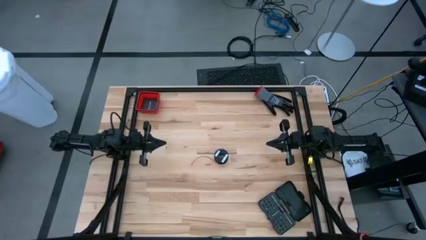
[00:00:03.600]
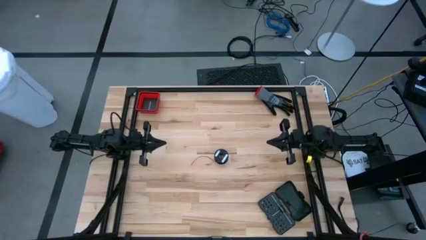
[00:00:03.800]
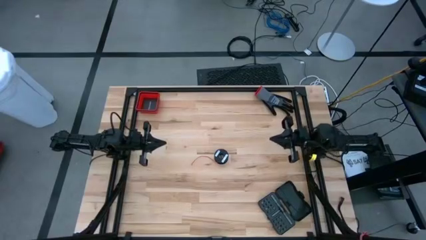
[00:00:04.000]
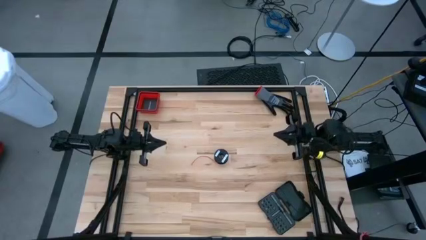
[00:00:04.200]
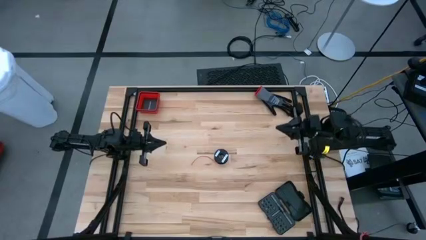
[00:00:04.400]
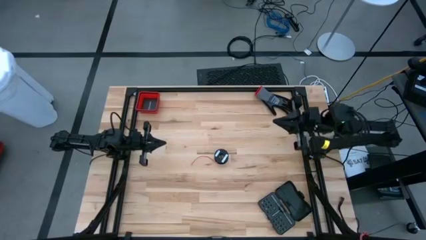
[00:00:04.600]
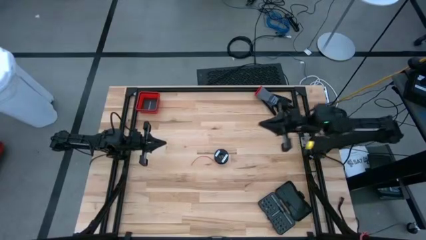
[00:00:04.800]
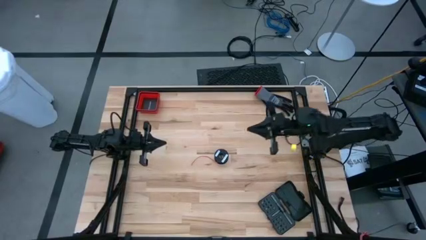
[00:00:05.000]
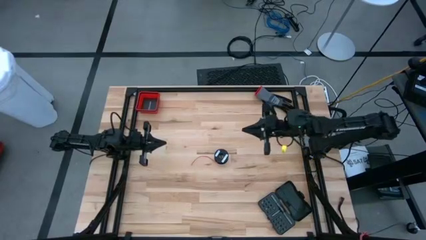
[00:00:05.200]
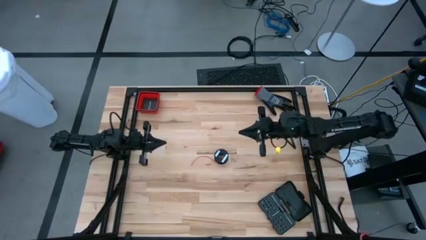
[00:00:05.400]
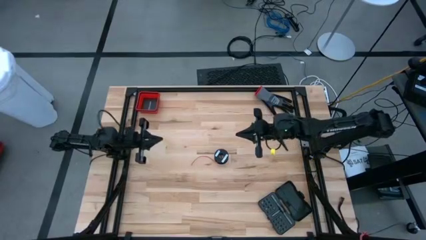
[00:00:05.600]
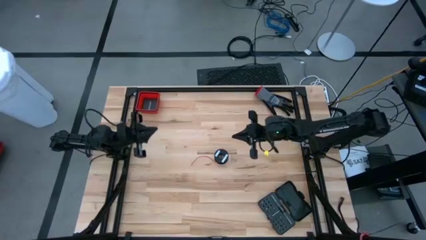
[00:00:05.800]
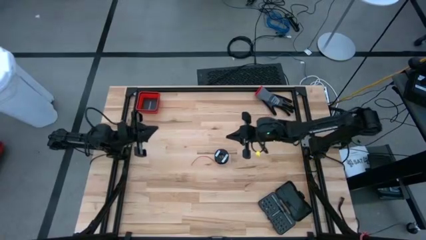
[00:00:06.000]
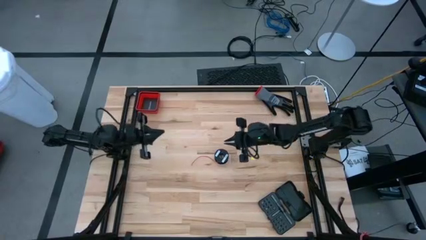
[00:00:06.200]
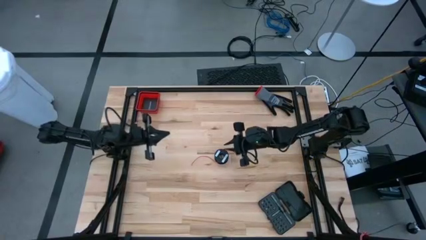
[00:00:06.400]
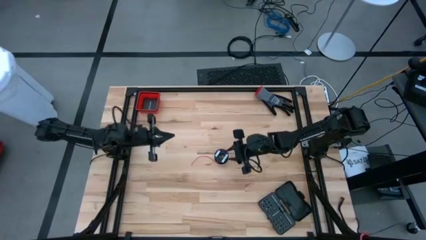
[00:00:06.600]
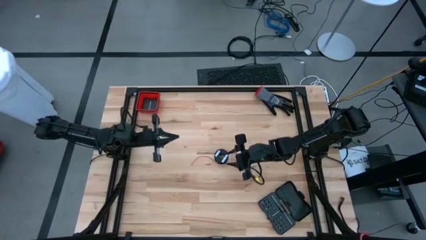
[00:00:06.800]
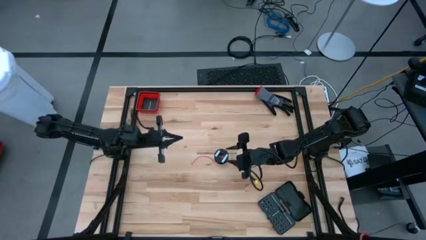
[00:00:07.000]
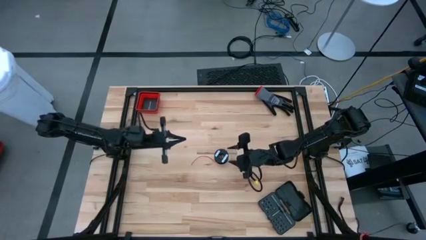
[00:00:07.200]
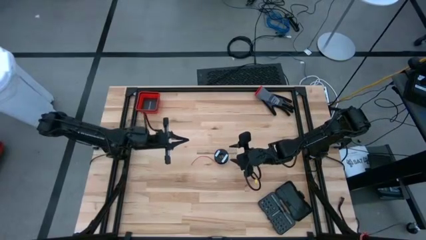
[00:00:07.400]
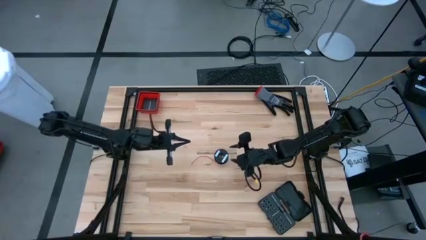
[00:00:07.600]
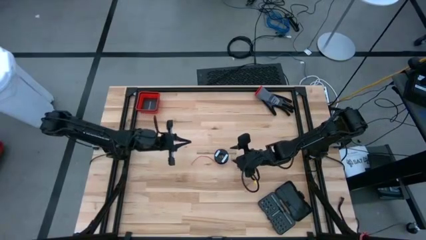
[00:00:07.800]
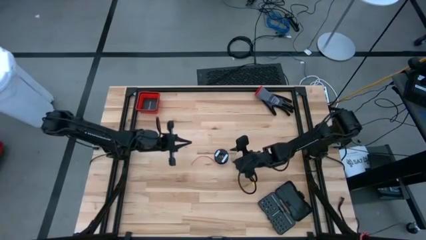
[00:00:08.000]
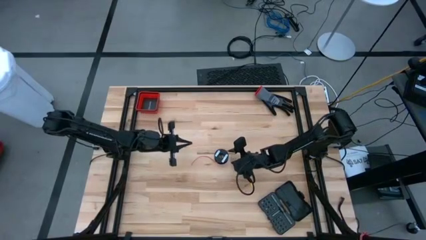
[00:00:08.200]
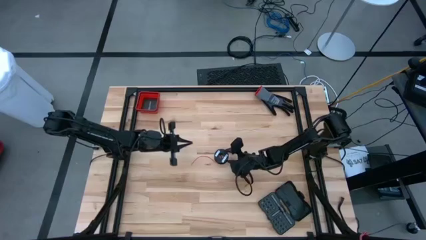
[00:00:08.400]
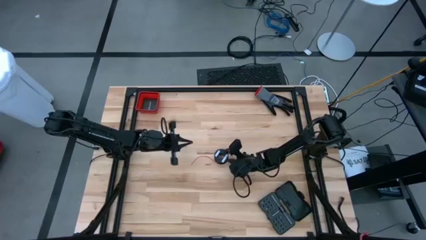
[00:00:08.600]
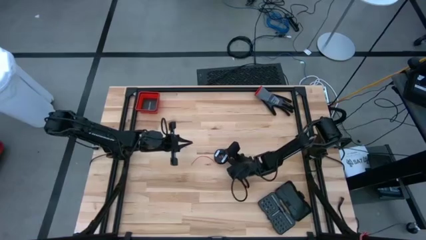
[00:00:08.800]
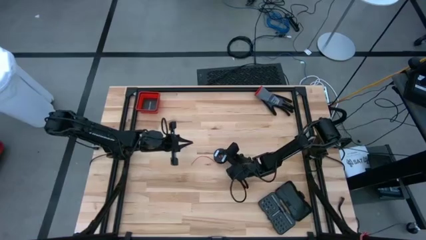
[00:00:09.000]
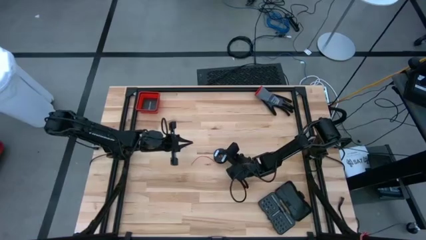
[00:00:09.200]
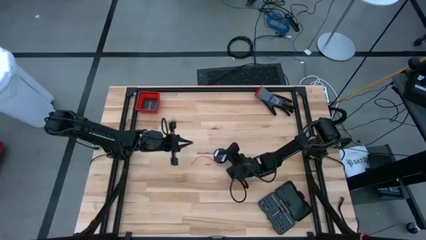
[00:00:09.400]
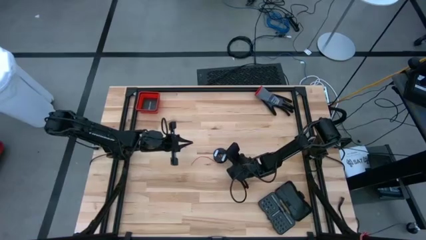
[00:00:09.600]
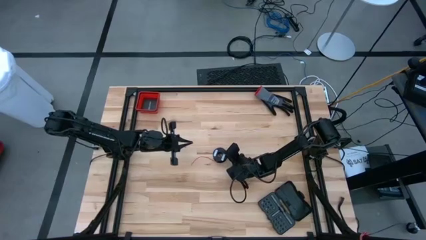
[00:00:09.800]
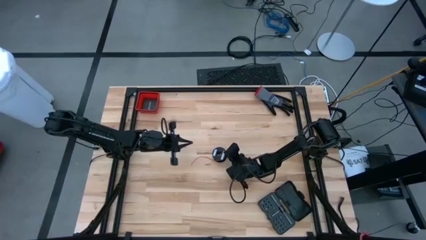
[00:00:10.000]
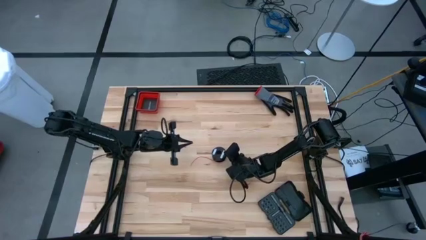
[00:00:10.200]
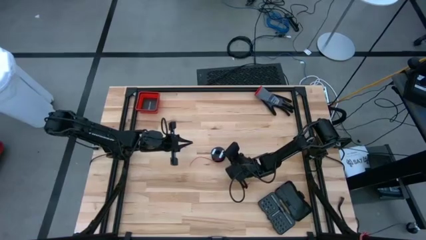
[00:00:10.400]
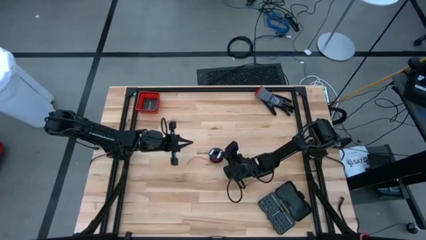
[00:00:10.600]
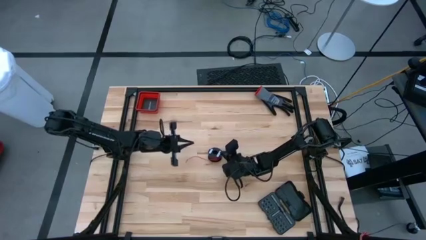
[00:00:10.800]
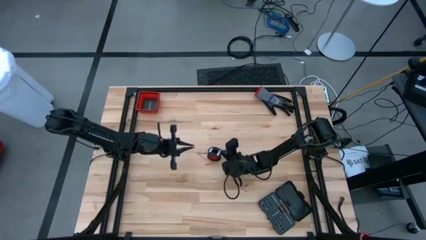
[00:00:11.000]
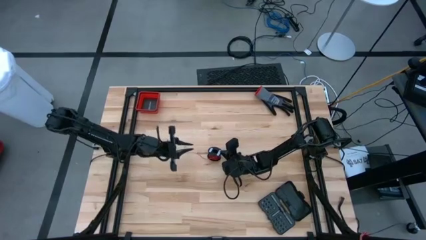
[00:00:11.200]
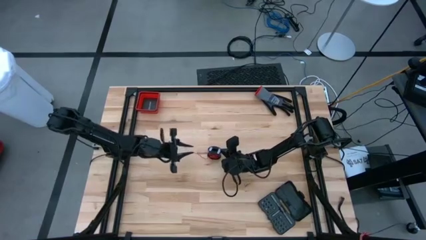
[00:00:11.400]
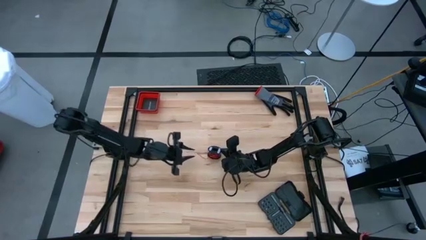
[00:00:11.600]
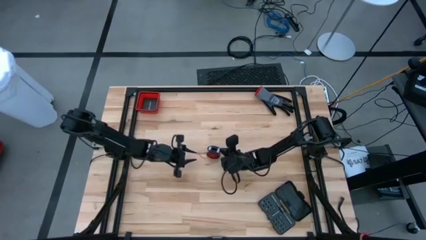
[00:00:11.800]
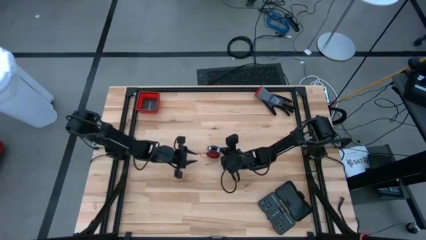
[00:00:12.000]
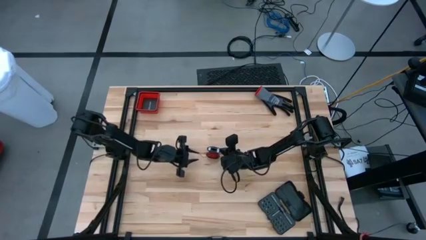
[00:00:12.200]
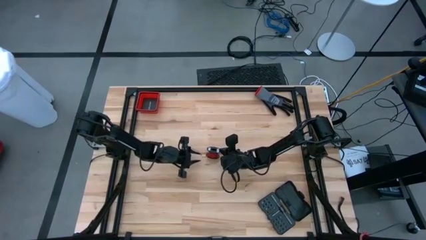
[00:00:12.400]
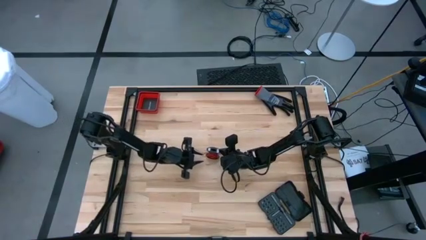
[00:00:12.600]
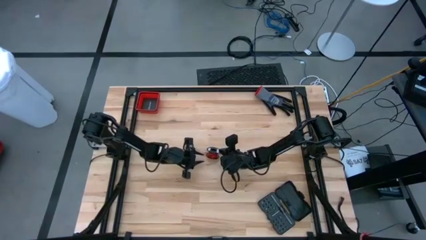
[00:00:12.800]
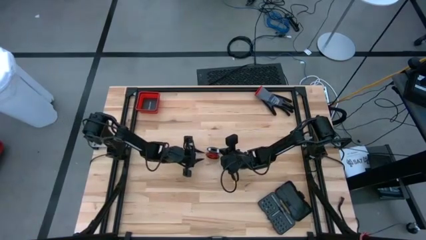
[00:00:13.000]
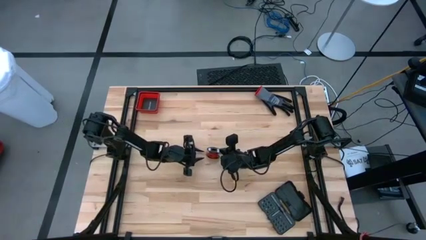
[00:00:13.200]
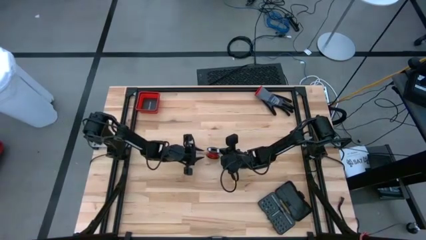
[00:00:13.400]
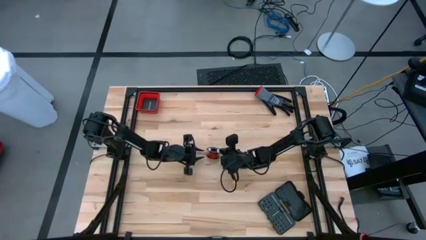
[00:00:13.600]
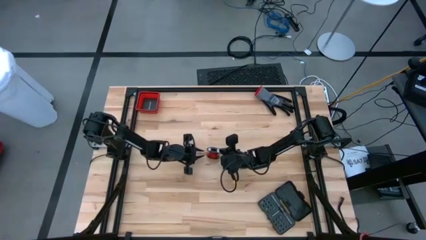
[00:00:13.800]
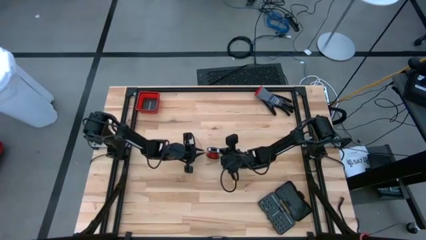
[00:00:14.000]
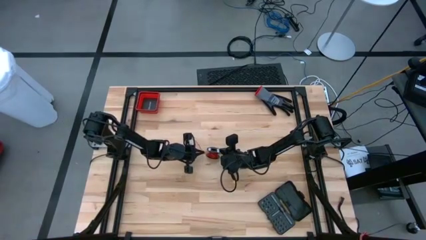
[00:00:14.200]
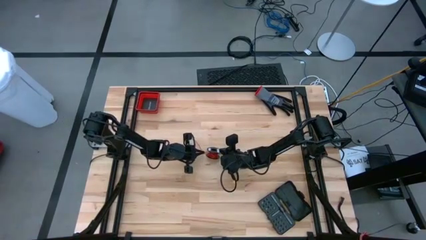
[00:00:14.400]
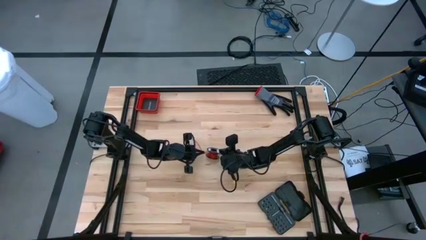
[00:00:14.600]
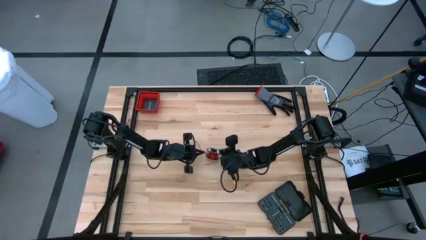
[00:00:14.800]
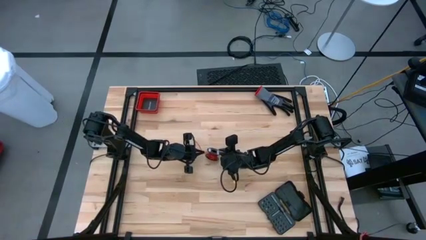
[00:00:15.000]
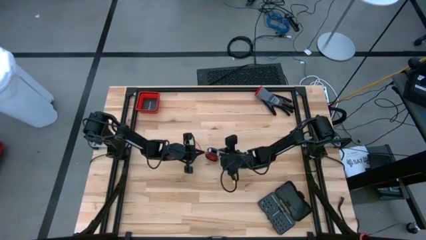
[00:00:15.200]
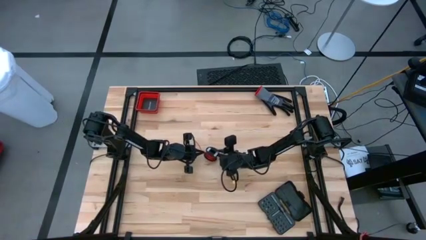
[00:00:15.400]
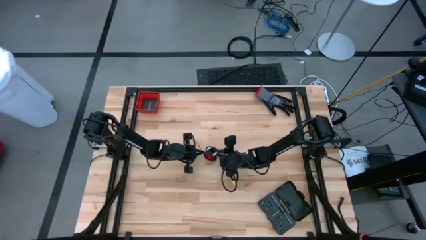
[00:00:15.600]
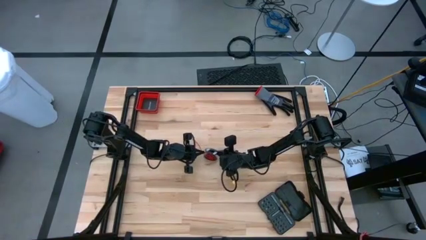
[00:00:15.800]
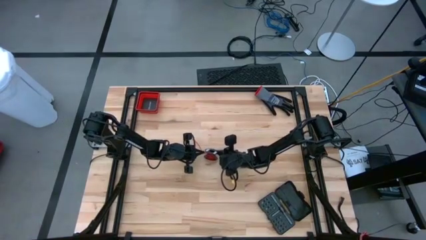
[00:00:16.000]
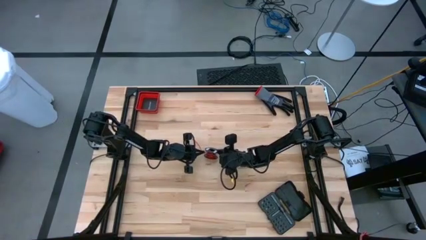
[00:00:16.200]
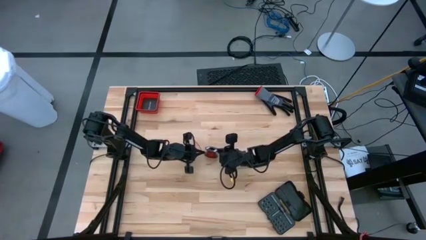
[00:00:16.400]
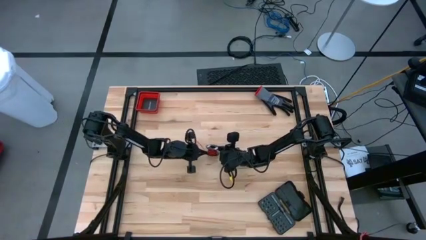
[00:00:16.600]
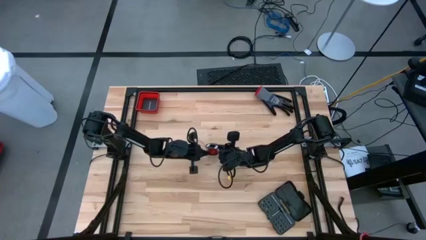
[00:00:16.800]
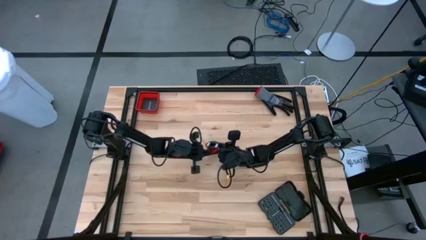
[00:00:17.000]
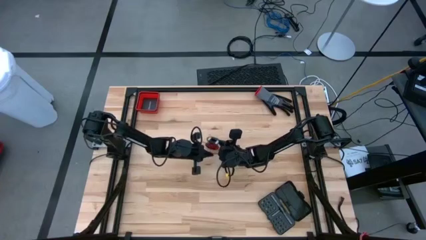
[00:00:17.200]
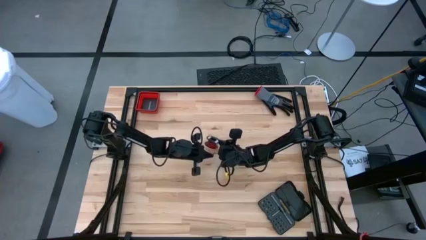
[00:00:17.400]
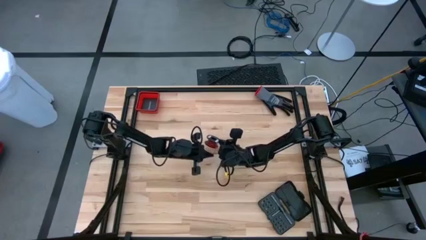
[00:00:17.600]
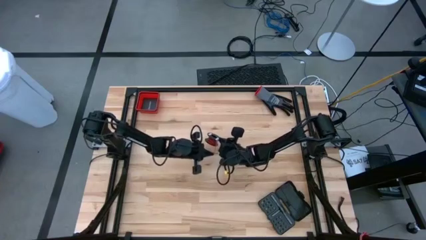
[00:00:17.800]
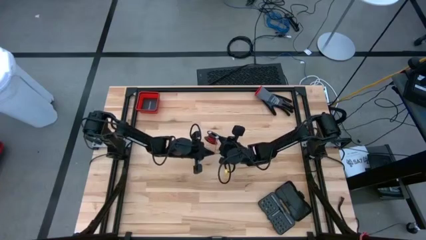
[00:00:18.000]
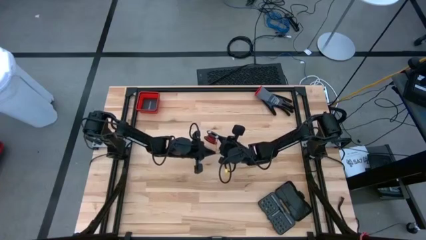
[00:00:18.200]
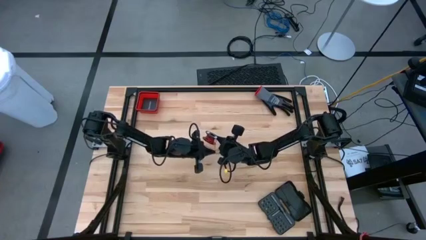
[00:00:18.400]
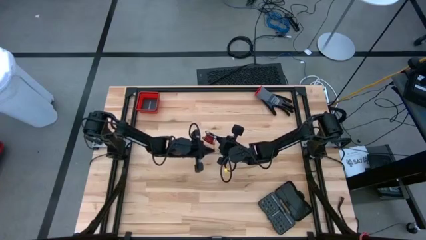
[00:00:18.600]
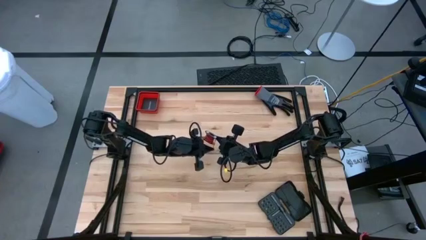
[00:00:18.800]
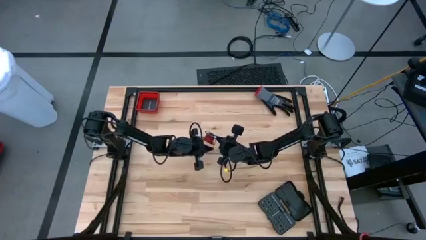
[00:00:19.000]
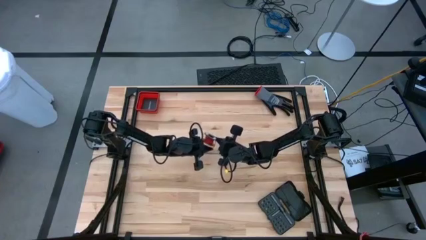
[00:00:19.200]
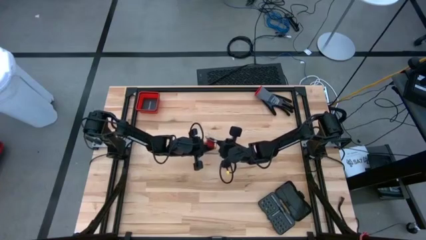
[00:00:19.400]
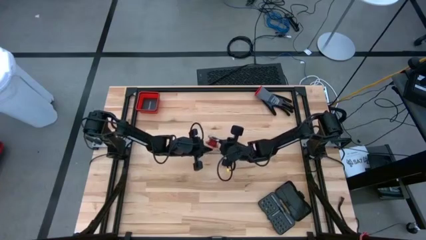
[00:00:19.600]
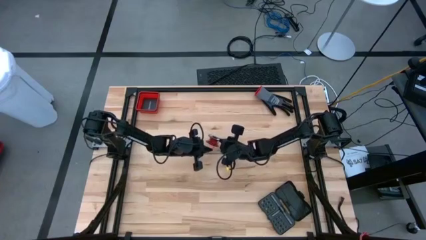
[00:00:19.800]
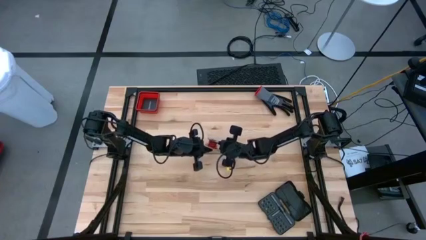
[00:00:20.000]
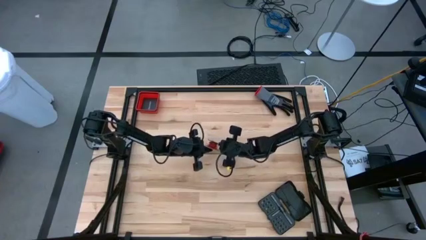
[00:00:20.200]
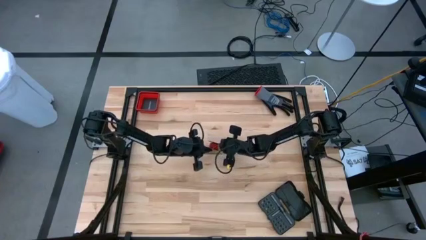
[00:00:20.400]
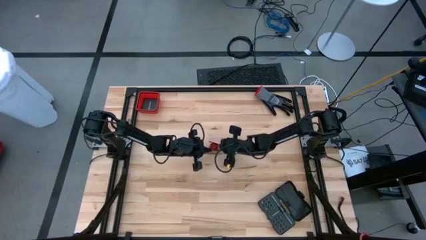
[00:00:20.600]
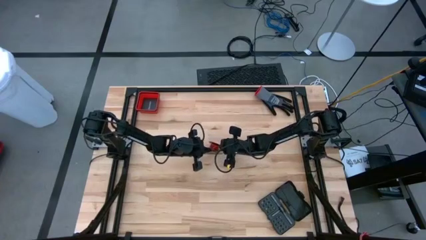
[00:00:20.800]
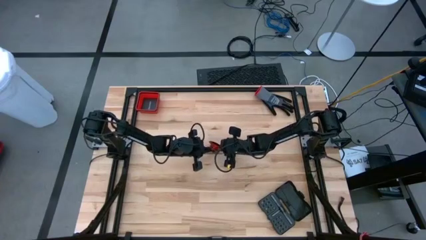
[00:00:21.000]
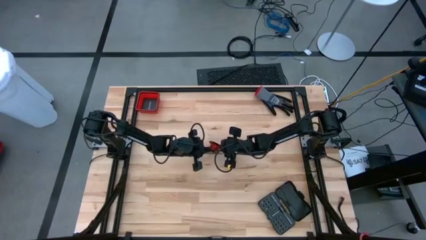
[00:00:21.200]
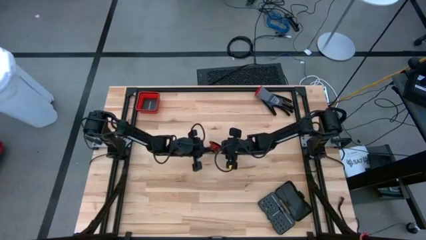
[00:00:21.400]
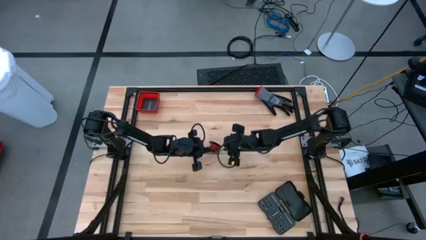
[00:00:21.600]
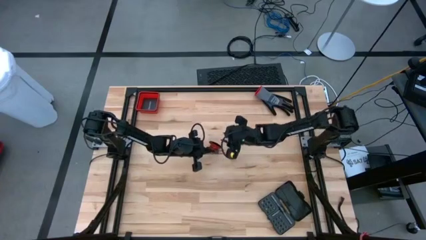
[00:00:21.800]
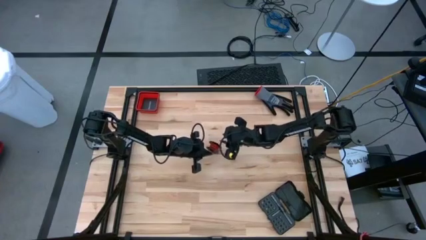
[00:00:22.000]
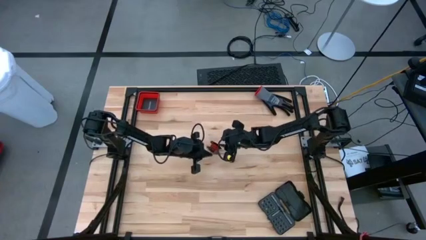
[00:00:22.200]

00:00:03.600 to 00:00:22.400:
Task: Coil cords
Uncoil the red wire from the spool
